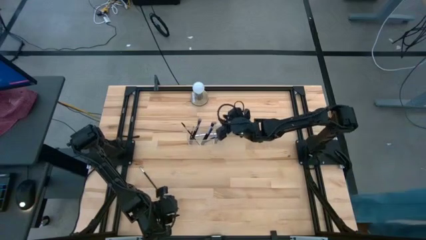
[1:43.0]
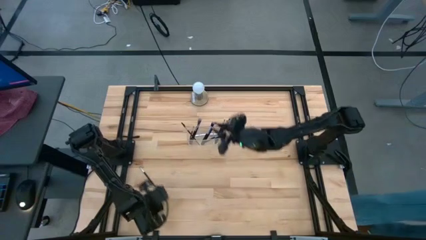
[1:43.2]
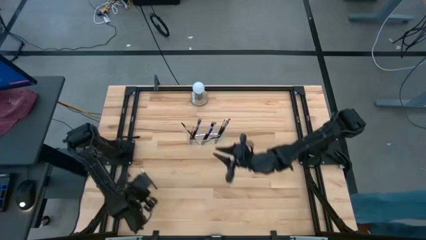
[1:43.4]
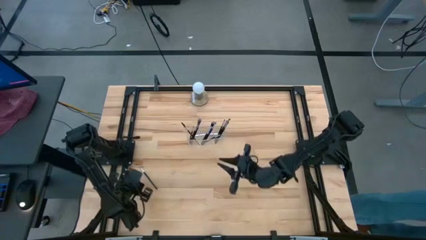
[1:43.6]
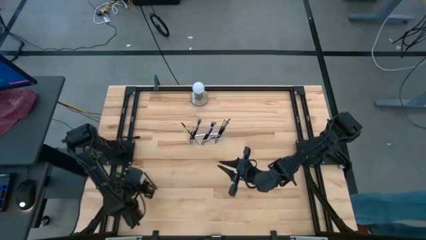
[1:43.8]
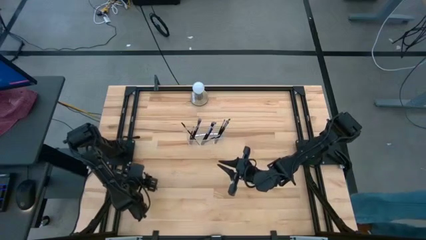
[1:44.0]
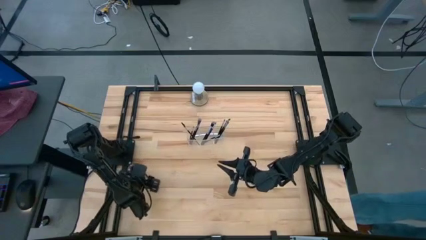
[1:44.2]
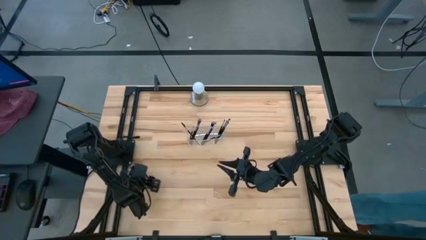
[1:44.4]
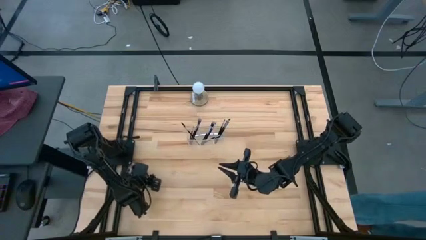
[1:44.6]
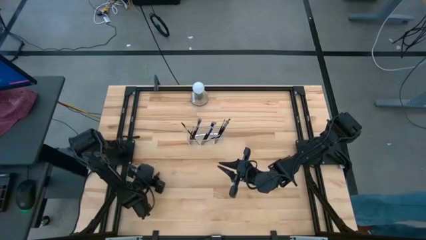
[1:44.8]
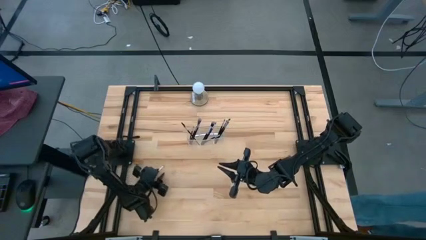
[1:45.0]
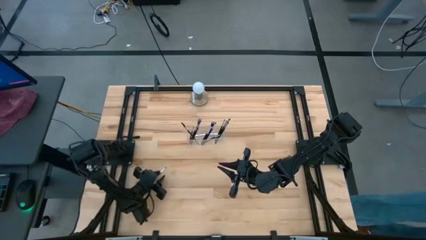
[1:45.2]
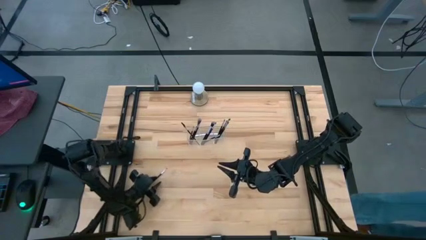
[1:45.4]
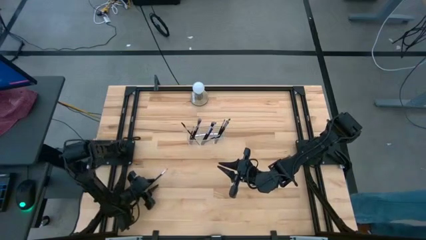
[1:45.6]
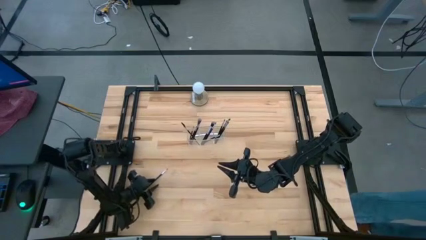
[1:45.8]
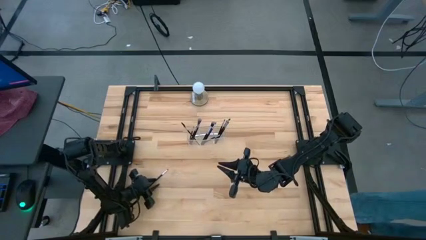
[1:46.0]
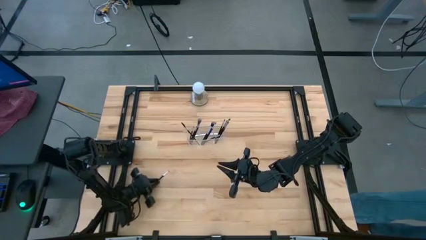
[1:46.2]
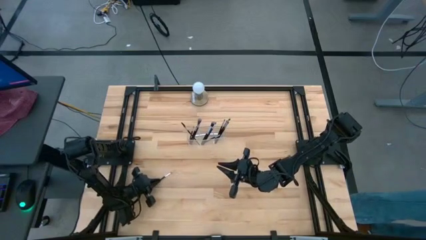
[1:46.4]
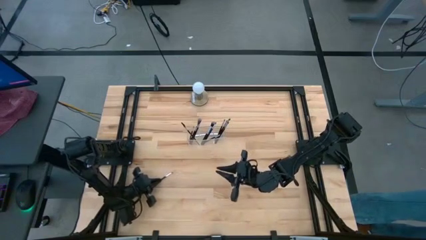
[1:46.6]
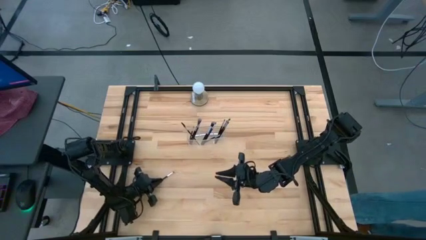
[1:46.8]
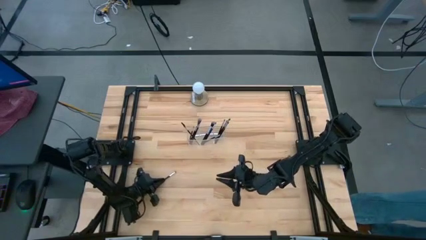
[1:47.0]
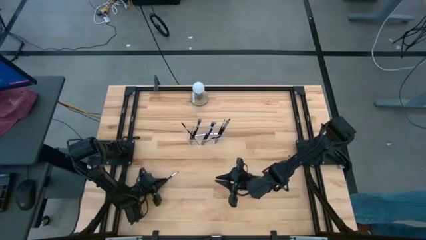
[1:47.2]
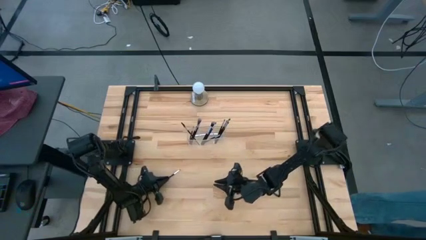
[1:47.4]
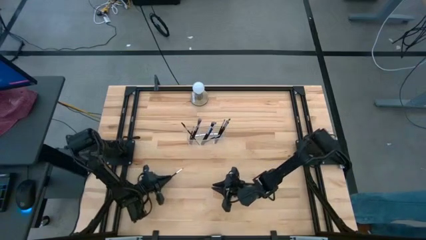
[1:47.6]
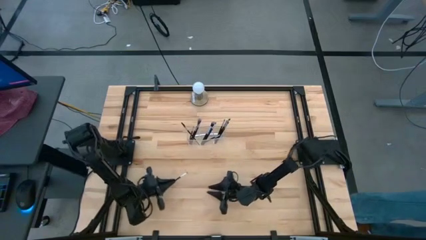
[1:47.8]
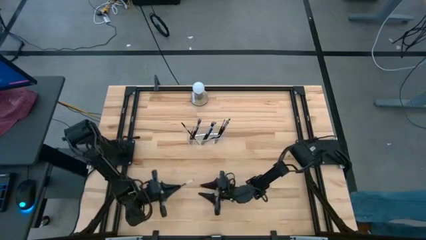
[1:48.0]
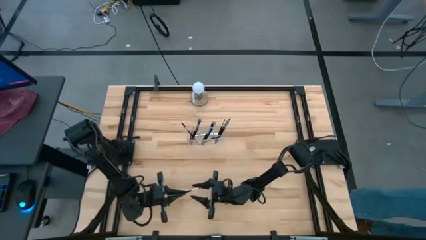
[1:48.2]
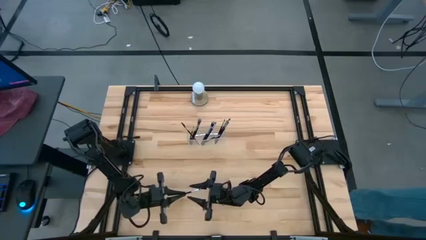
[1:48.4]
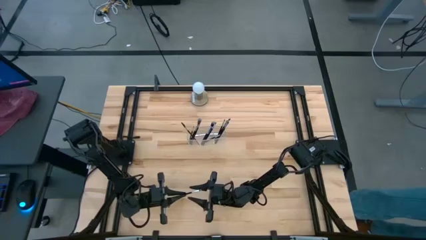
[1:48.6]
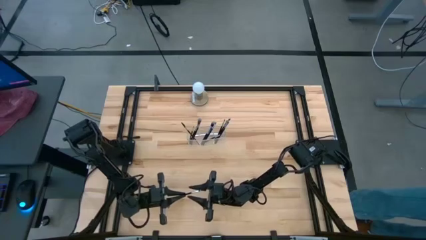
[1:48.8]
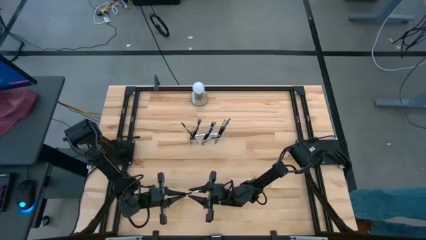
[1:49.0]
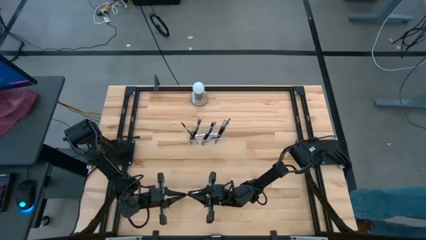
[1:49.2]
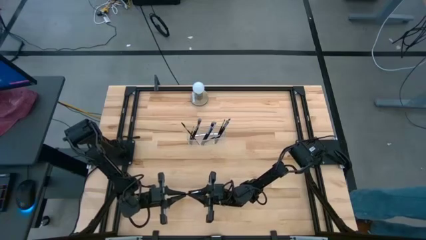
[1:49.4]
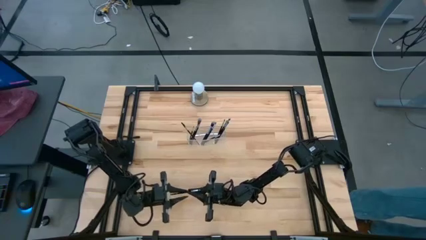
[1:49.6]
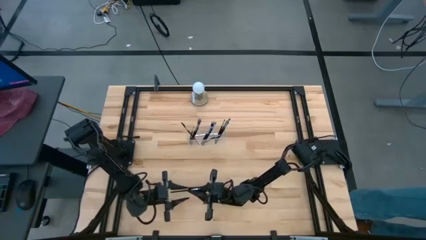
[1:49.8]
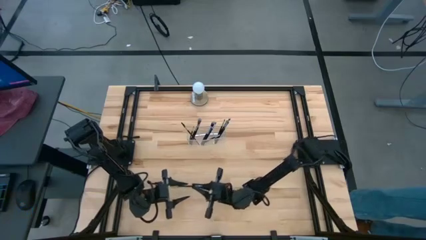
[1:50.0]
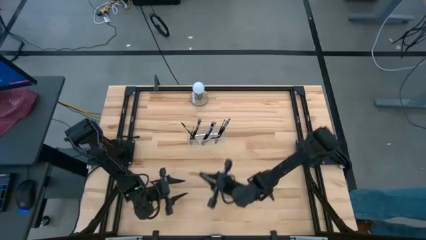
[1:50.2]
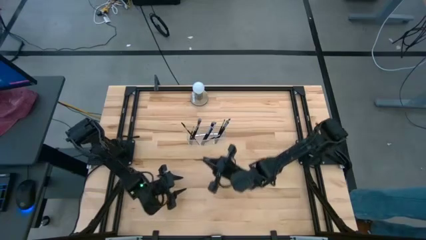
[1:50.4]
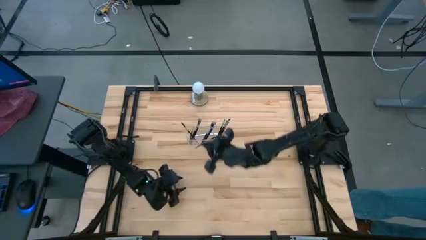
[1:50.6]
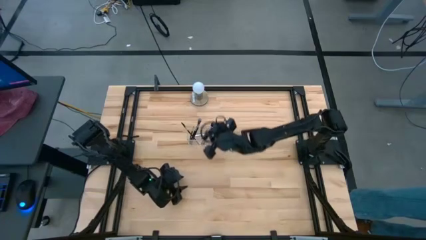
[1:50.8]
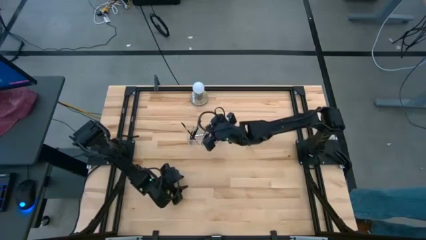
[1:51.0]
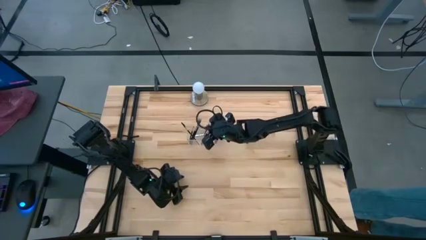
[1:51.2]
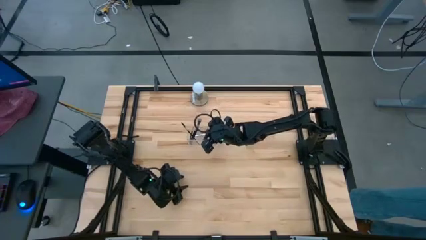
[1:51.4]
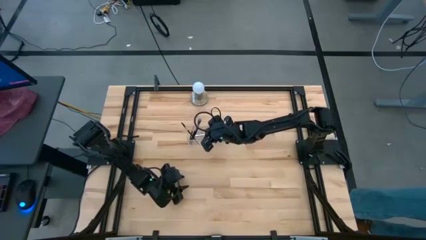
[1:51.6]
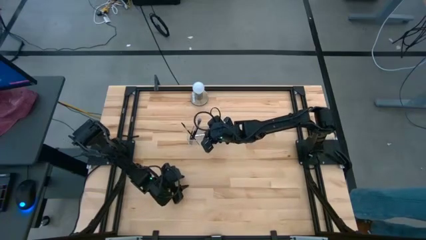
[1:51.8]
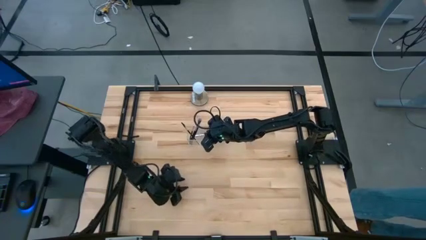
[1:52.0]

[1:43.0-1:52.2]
Task: Put items in baskets/containers
Put the eyeshadow brush into the transparent organizer

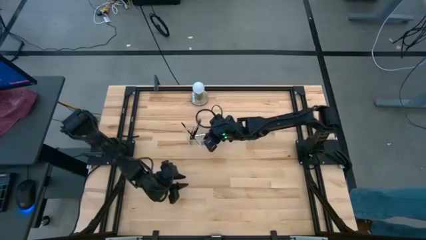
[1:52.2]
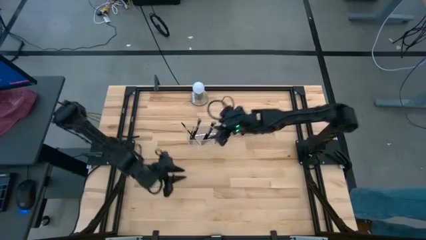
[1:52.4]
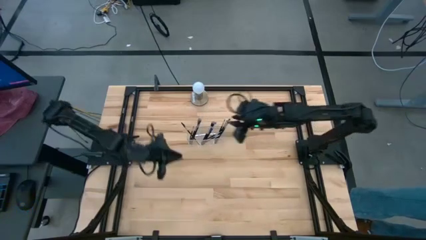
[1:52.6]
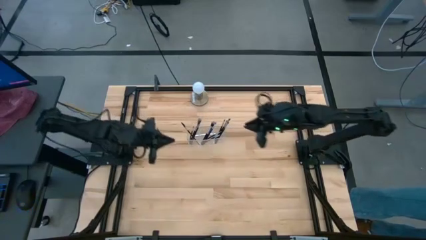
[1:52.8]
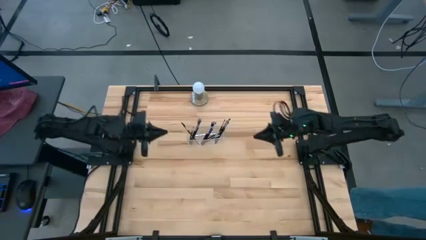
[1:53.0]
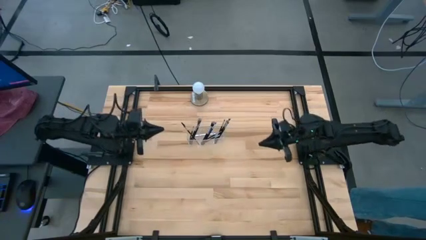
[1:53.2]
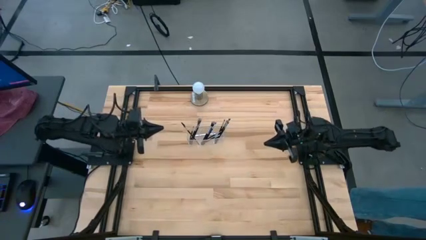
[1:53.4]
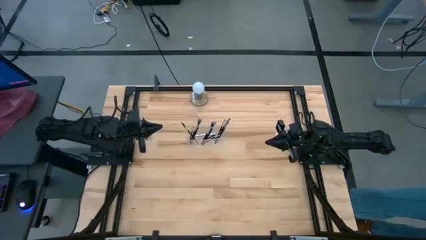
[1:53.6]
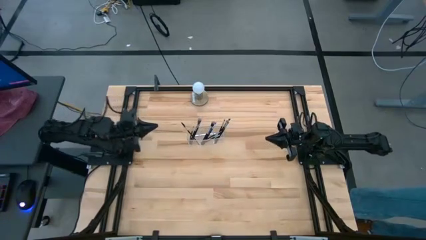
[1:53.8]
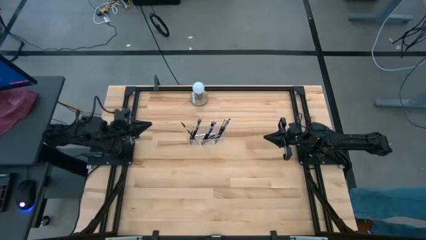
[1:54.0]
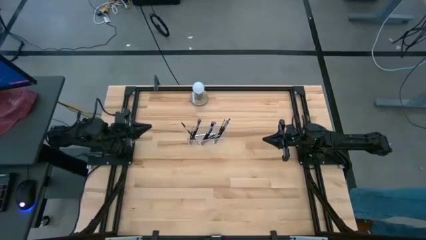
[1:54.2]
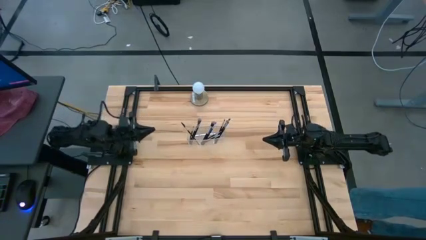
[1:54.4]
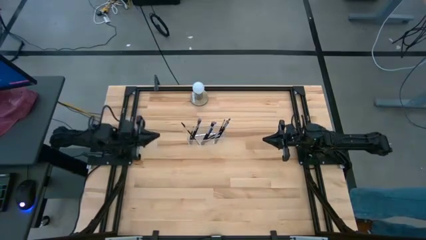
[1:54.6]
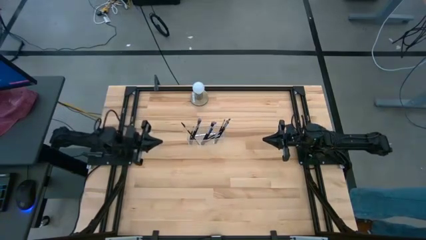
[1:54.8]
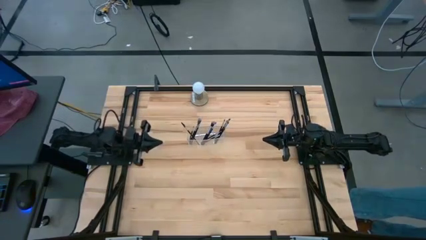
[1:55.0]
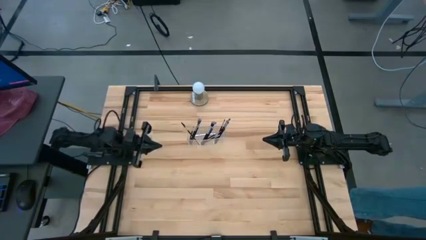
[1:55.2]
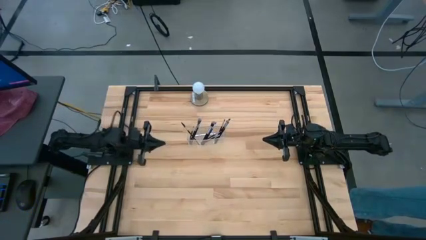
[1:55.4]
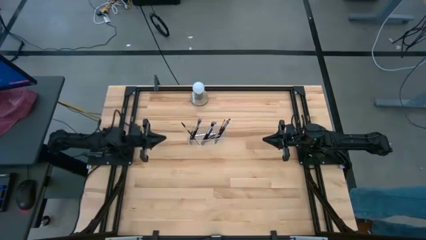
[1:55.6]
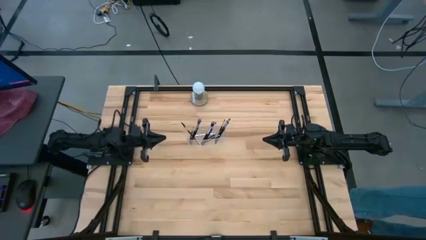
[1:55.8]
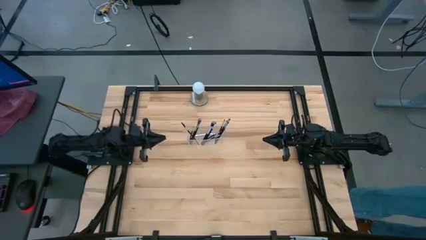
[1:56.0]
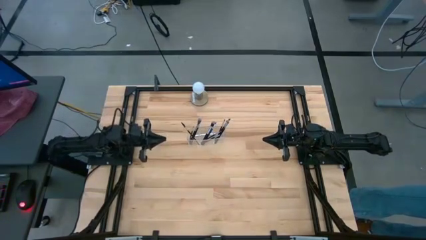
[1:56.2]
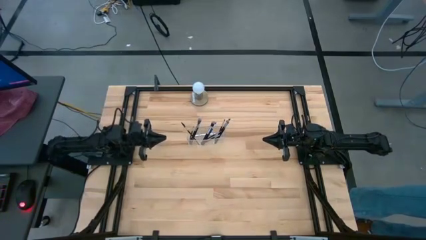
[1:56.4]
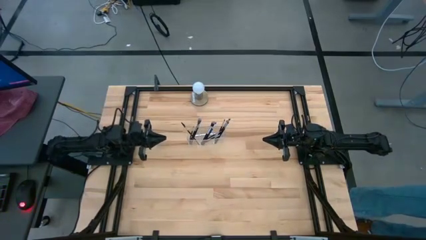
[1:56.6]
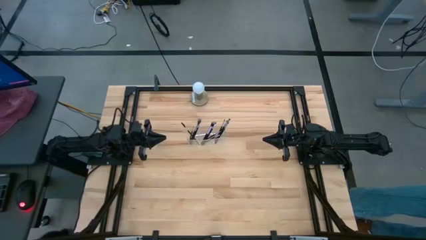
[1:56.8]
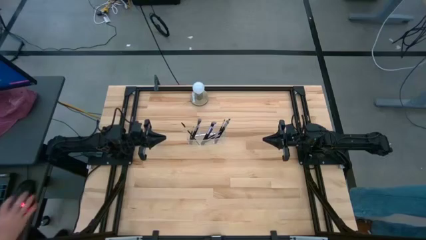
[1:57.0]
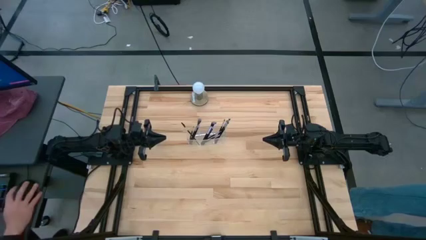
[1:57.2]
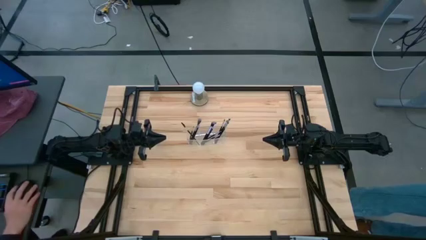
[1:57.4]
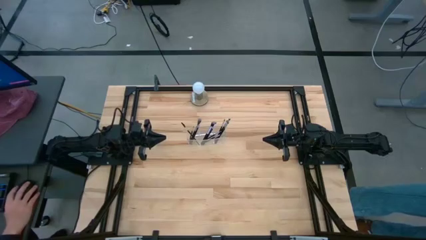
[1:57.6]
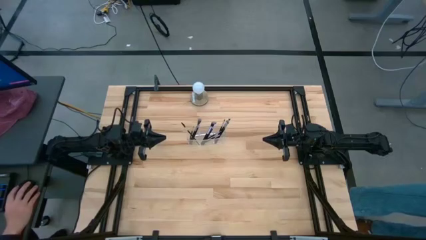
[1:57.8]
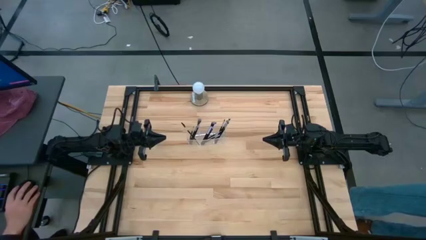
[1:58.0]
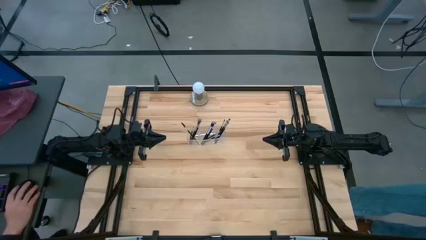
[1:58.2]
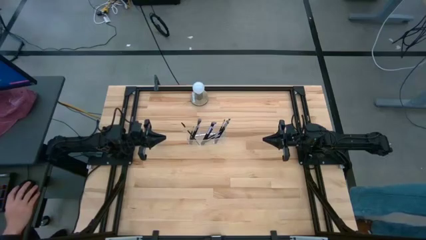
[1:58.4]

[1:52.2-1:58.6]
Return to Home Position
